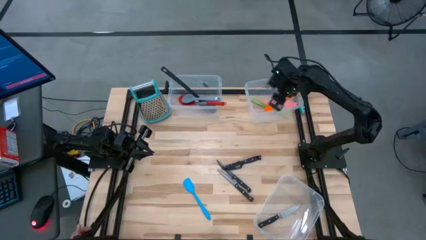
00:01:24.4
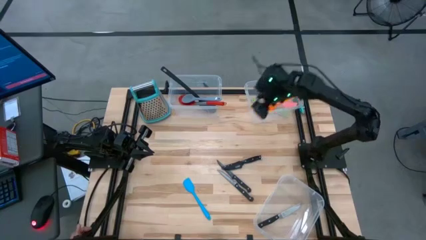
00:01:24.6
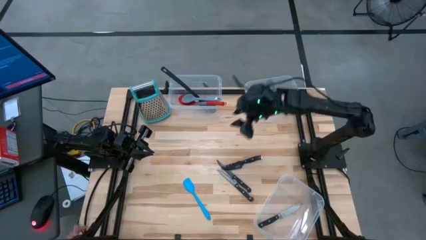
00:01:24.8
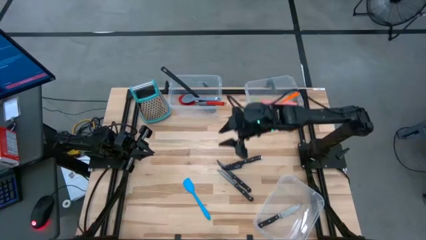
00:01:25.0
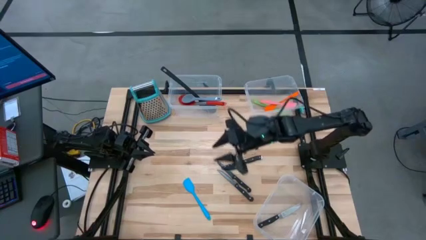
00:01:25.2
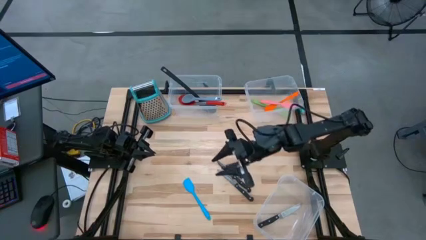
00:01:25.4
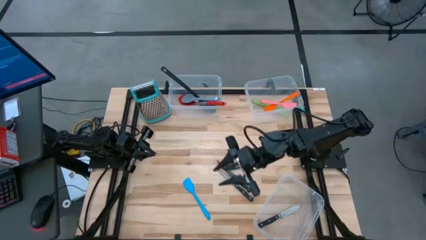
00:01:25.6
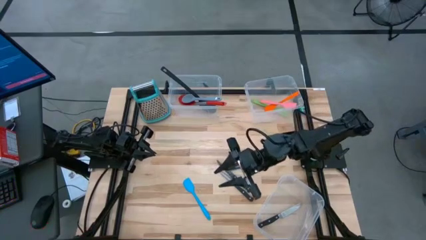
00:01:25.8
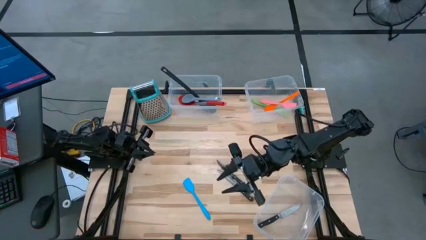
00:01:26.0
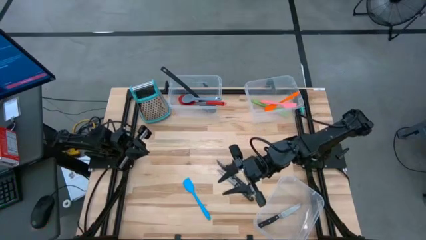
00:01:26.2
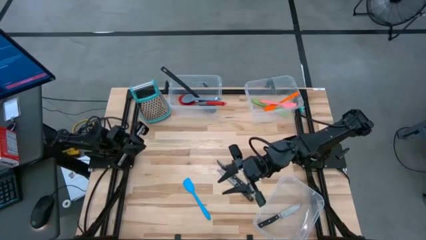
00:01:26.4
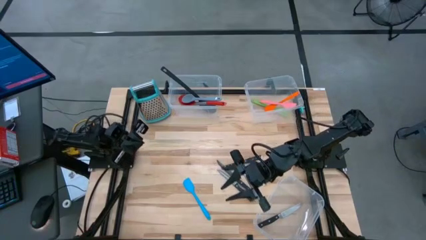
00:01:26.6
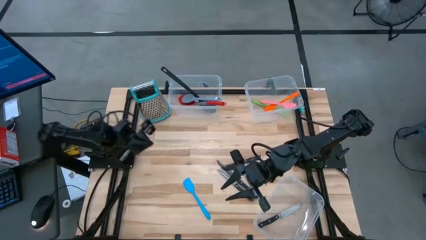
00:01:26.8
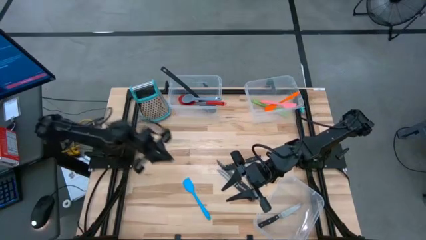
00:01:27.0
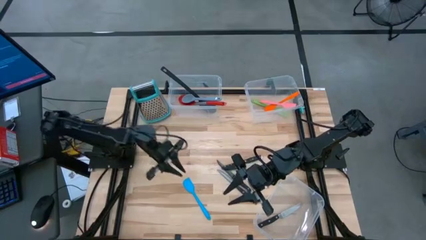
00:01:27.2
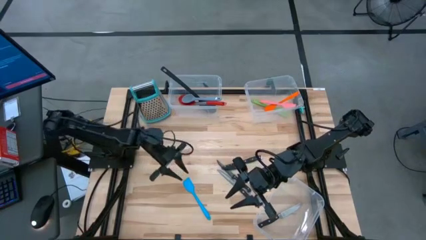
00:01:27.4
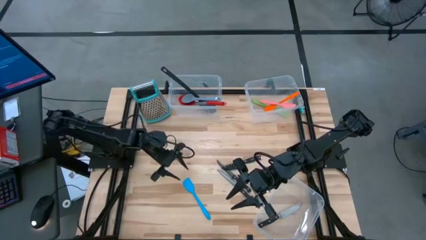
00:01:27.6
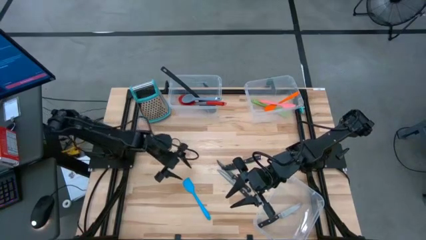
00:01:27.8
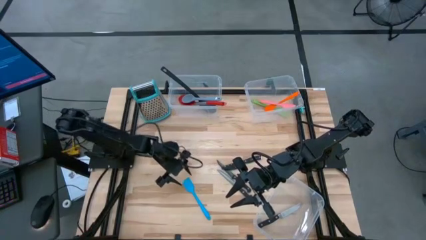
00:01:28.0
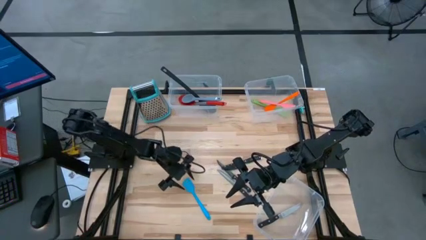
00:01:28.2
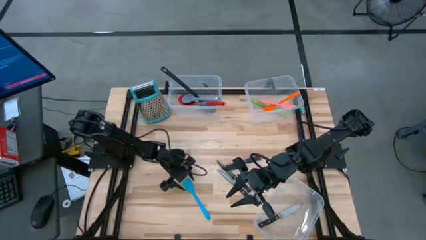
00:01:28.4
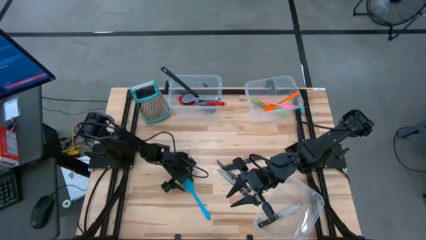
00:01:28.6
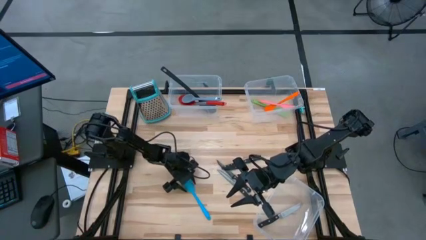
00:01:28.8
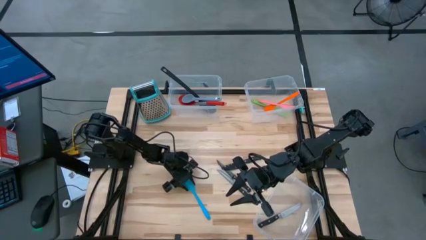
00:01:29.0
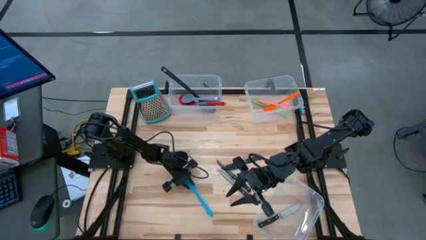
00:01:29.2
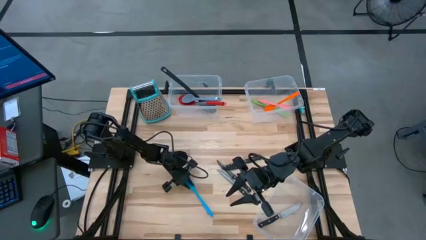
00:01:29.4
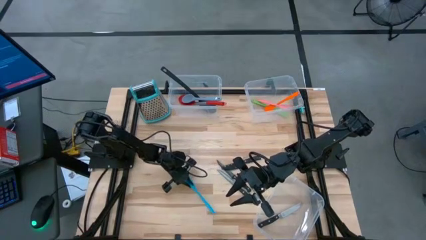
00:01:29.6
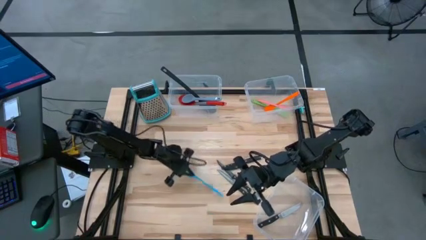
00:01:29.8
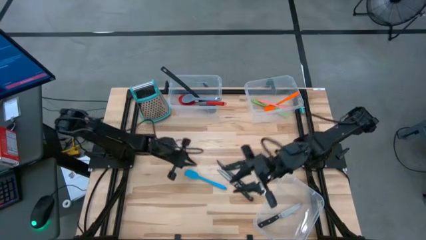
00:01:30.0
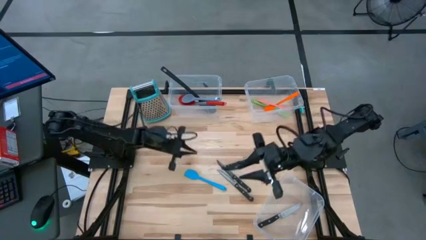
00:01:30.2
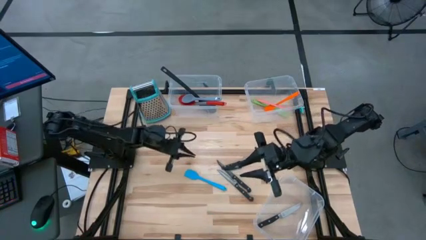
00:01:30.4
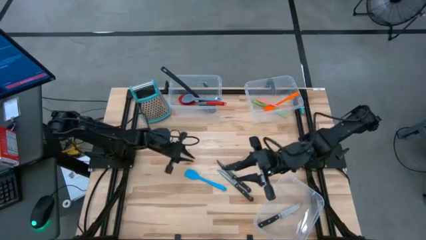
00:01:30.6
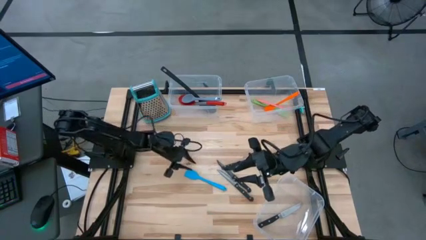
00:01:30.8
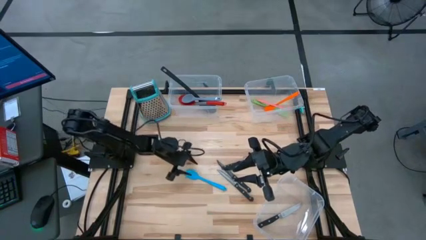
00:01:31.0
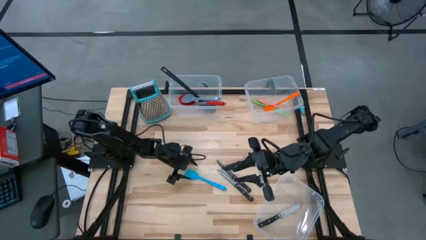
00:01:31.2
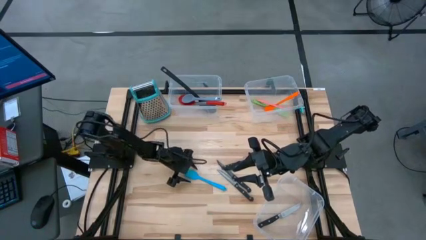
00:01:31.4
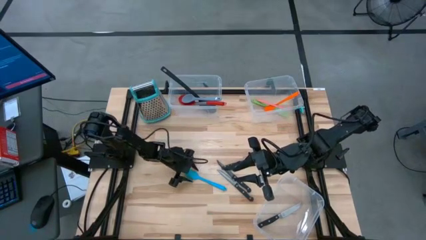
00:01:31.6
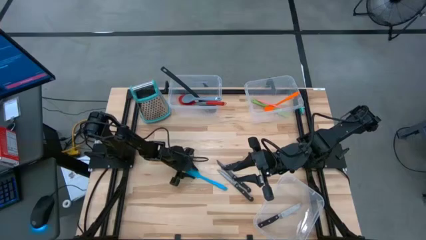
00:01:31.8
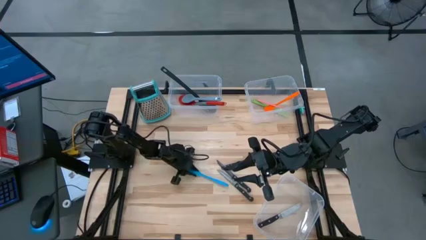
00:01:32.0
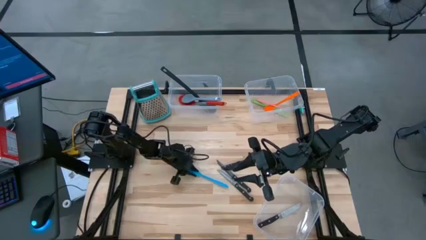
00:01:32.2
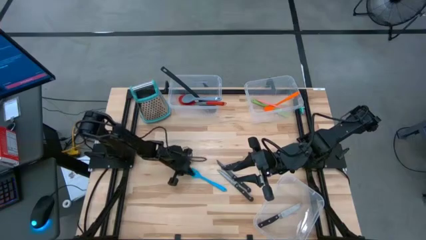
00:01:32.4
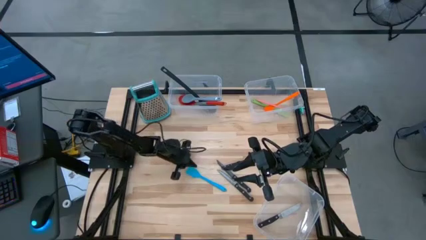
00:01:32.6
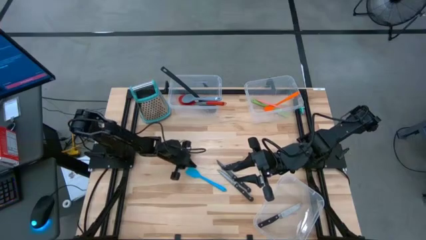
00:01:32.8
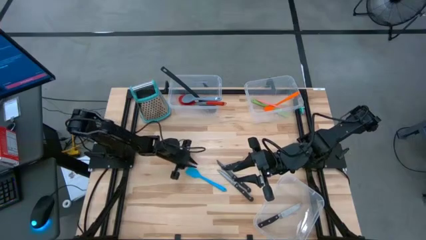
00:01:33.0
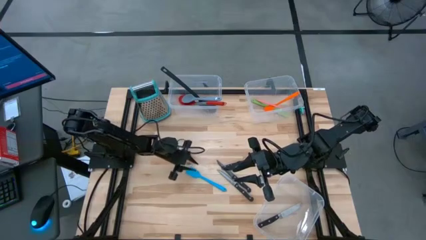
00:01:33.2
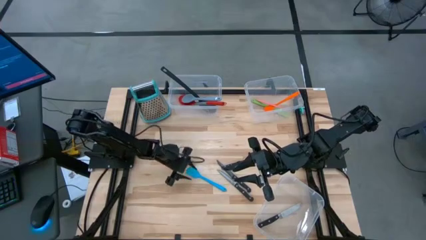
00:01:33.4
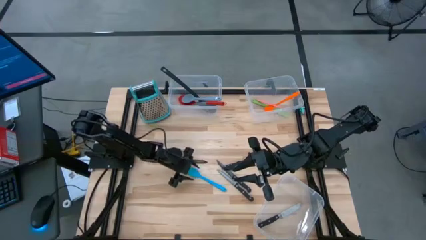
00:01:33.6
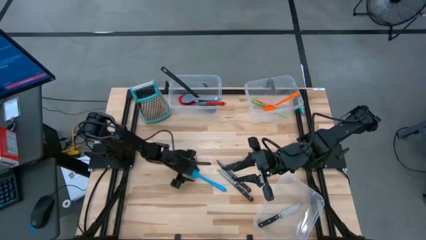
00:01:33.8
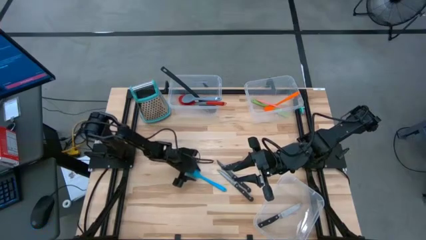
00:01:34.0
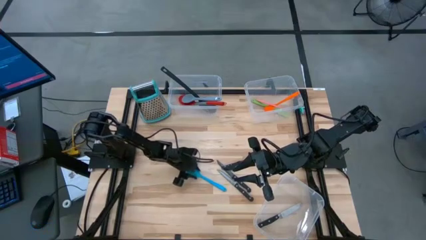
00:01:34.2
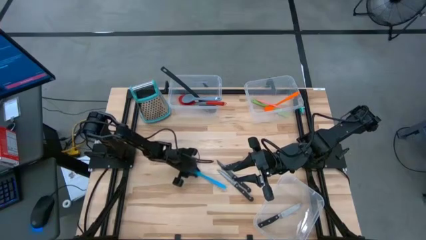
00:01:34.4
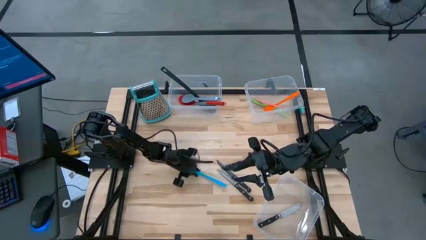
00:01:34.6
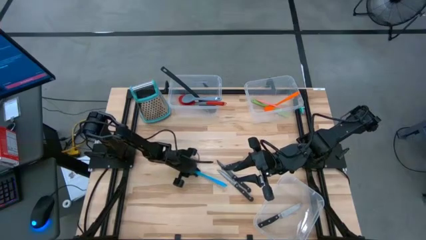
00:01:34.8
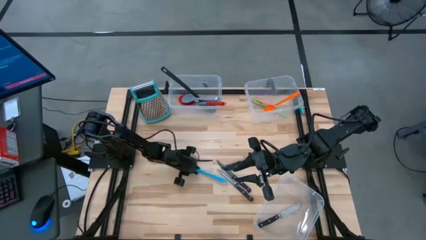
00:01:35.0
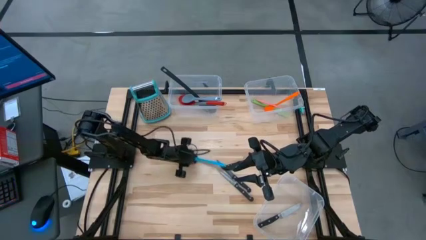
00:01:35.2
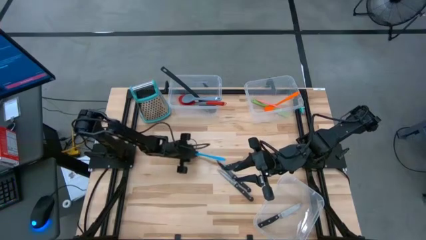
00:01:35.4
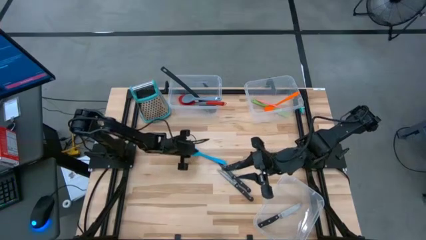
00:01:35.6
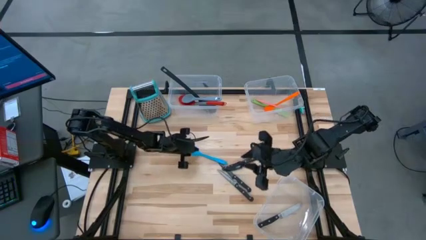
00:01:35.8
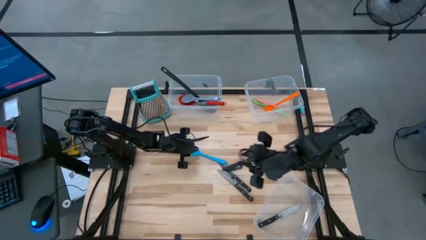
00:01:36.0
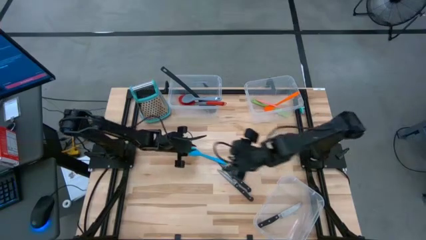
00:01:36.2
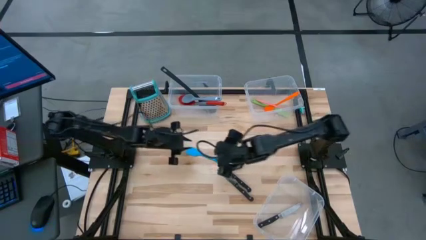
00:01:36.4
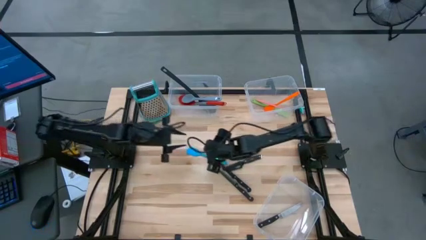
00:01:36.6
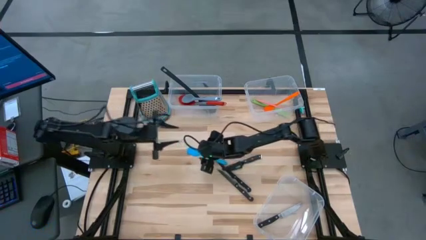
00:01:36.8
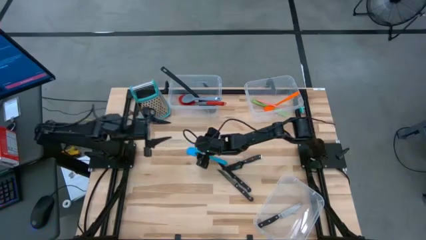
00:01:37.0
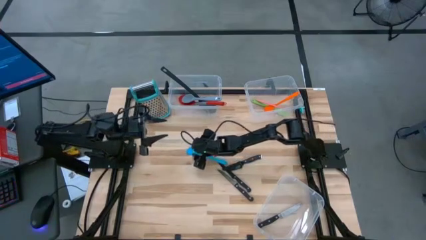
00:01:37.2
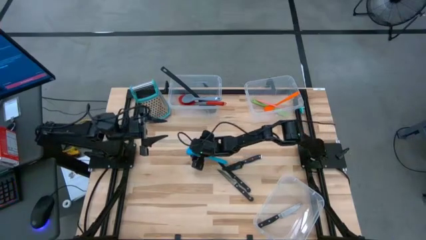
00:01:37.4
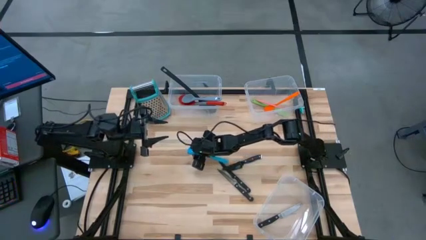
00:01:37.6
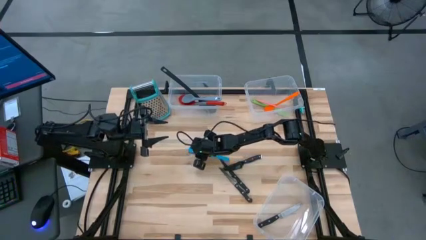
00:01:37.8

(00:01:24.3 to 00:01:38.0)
Task: Pick & Place Kitchen Items
Put the blue spatula into the top right transparent bin

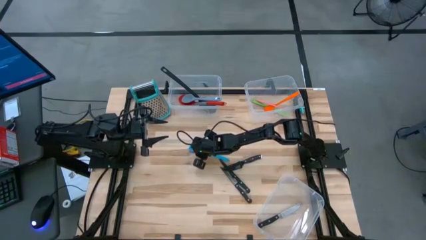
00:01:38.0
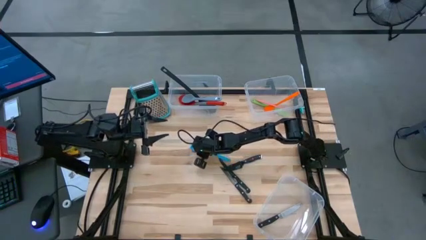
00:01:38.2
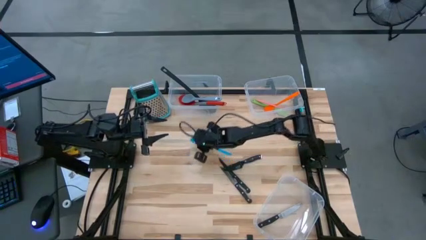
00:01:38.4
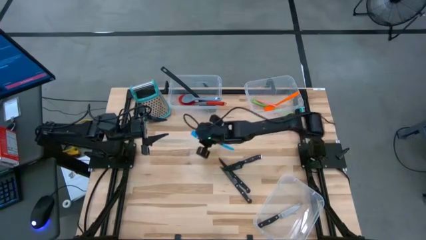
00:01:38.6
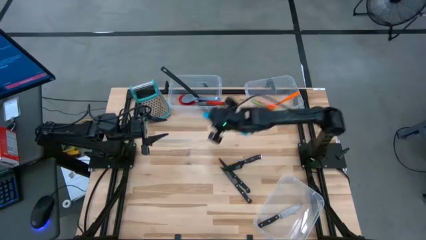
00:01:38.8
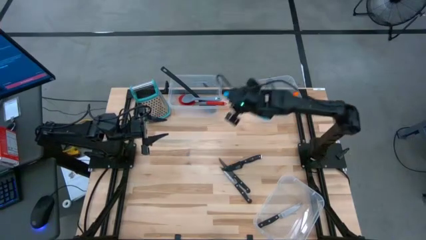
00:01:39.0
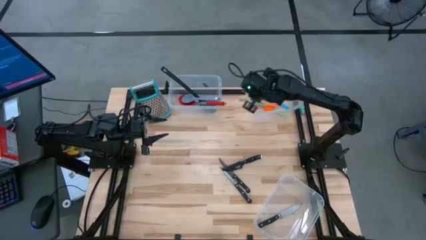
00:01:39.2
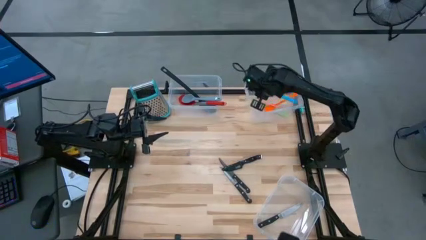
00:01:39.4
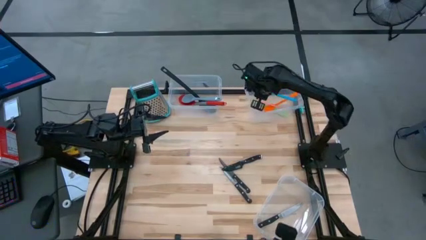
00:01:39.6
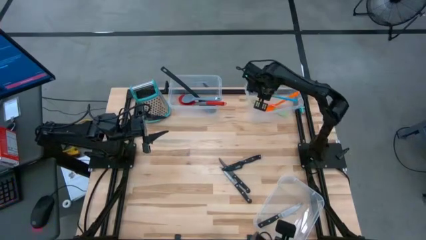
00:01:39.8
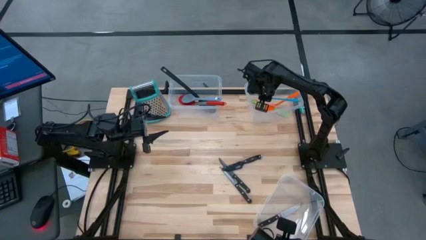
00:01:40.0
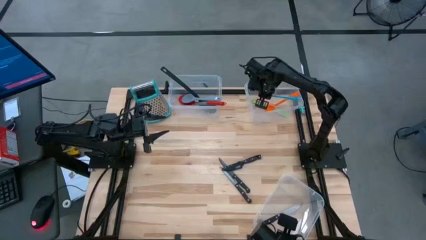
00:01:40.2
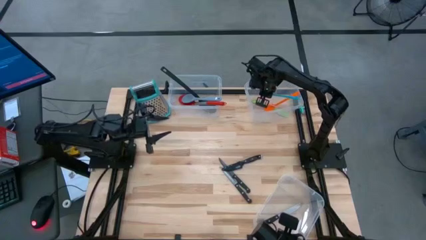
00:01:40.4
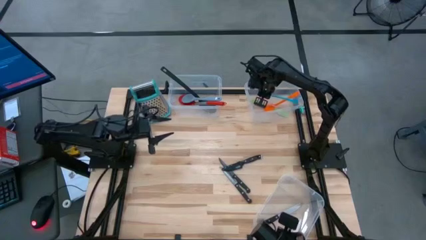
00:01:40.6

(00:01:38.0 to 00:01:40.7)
Put the blue spatula into the top right transparent bin
